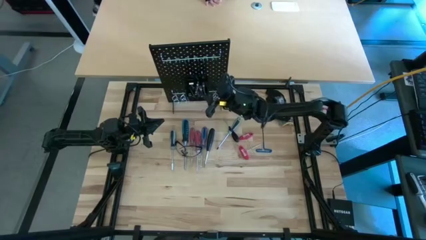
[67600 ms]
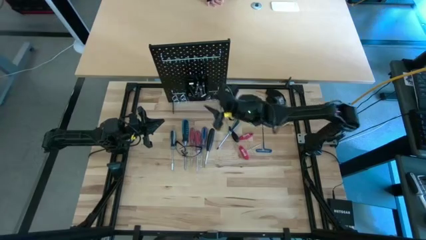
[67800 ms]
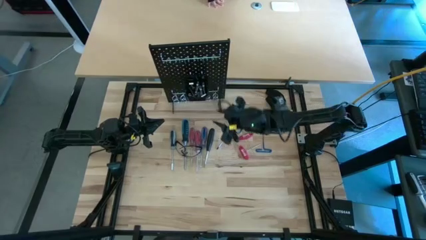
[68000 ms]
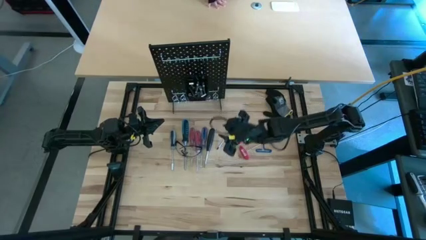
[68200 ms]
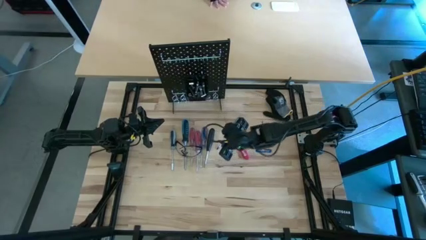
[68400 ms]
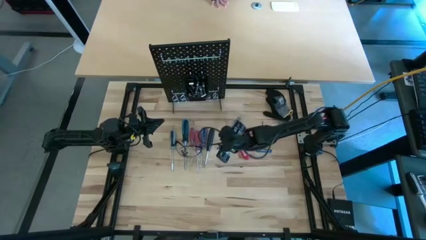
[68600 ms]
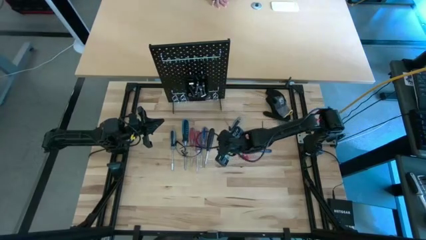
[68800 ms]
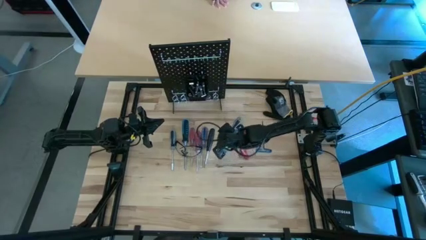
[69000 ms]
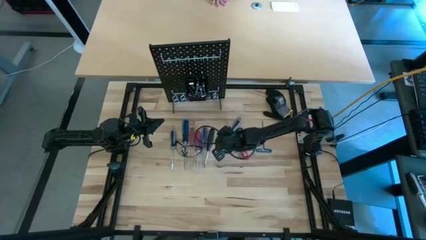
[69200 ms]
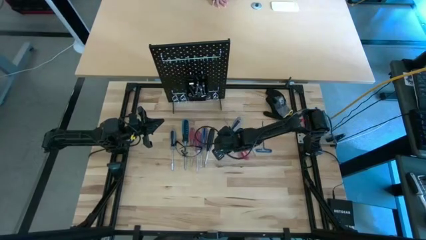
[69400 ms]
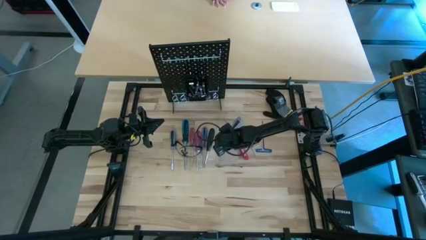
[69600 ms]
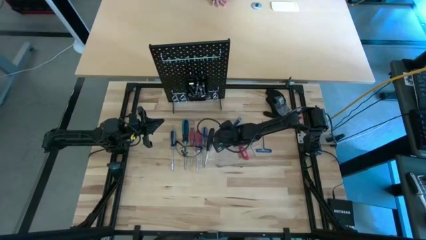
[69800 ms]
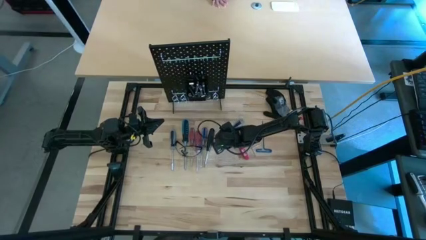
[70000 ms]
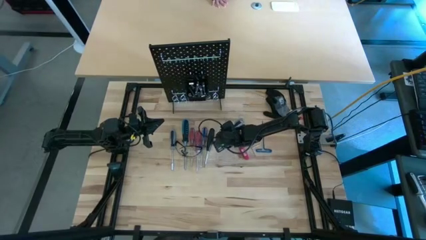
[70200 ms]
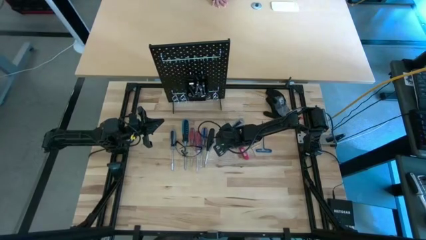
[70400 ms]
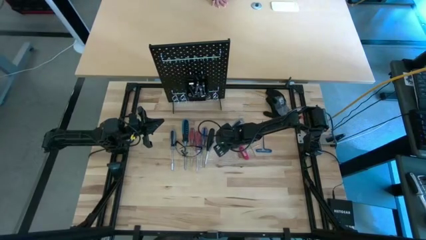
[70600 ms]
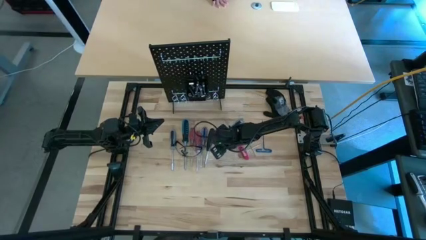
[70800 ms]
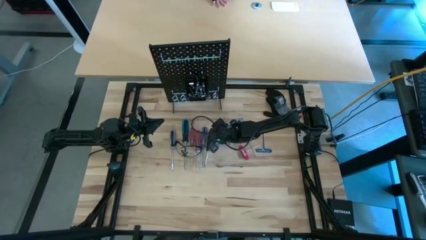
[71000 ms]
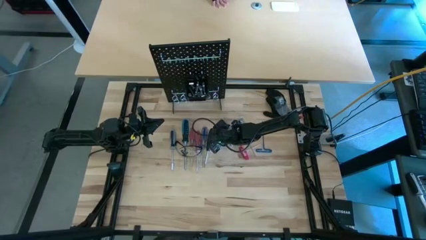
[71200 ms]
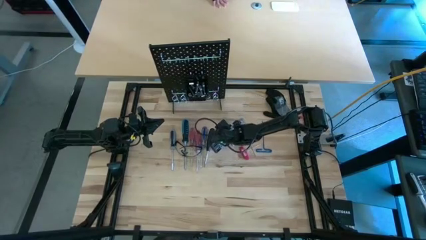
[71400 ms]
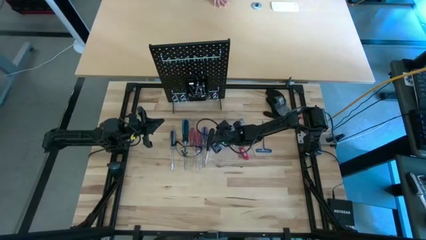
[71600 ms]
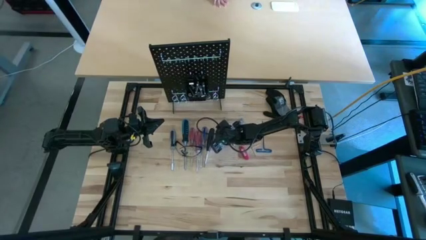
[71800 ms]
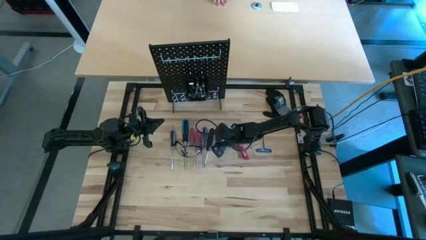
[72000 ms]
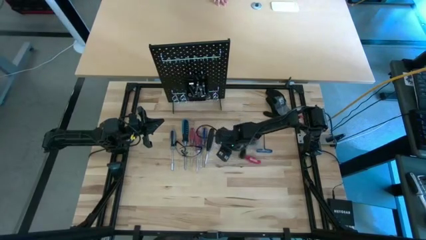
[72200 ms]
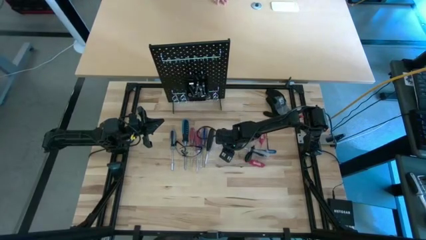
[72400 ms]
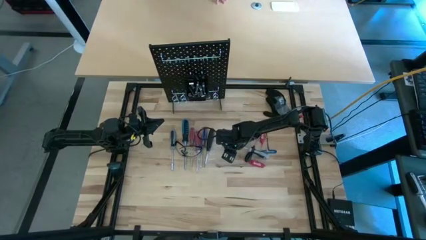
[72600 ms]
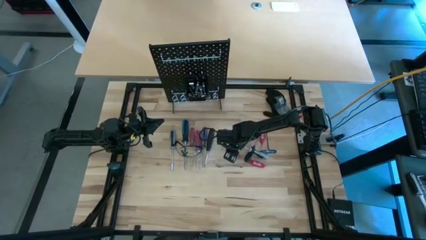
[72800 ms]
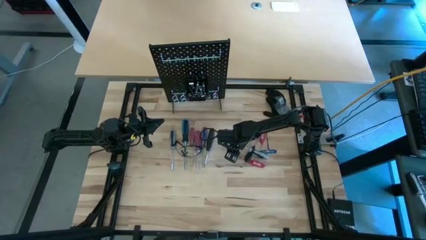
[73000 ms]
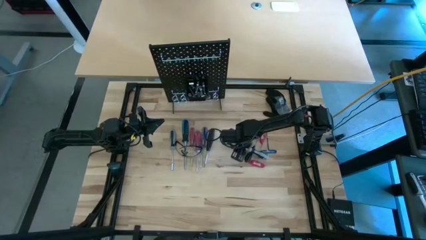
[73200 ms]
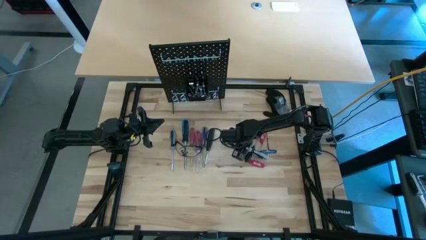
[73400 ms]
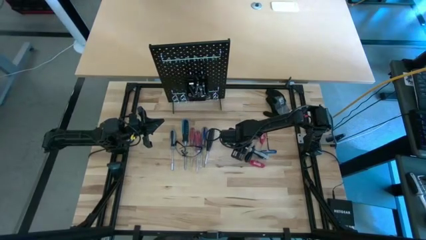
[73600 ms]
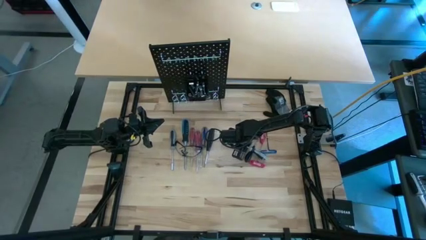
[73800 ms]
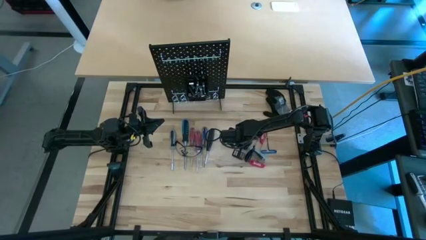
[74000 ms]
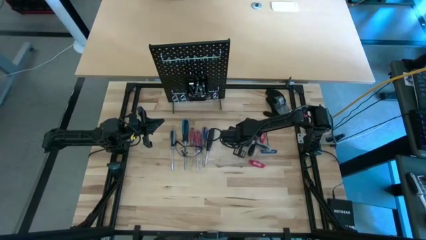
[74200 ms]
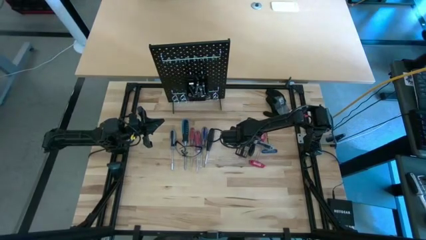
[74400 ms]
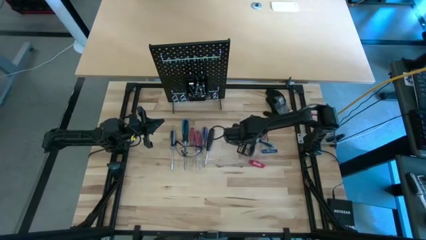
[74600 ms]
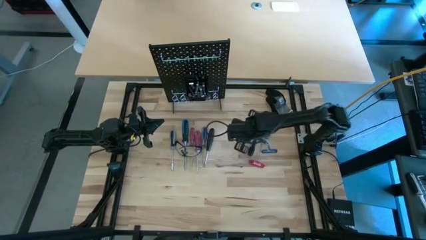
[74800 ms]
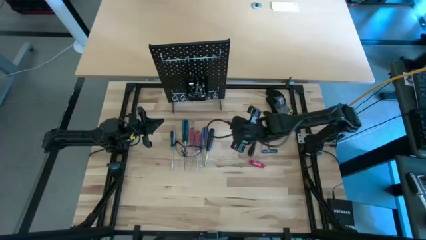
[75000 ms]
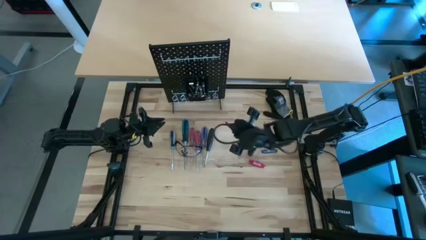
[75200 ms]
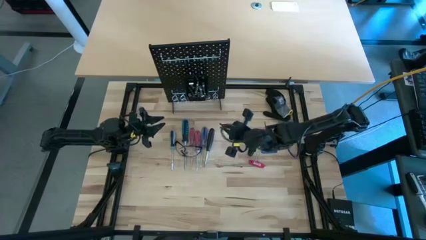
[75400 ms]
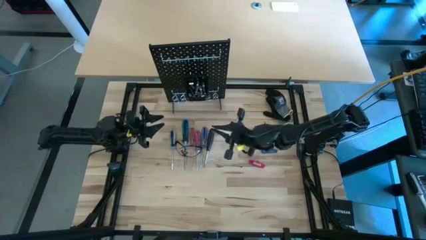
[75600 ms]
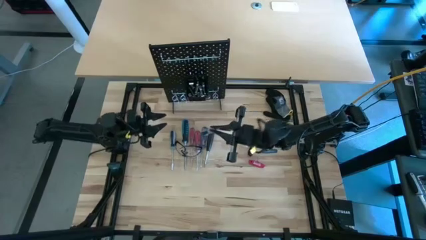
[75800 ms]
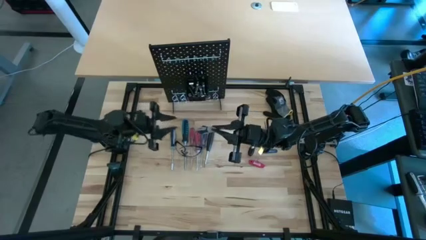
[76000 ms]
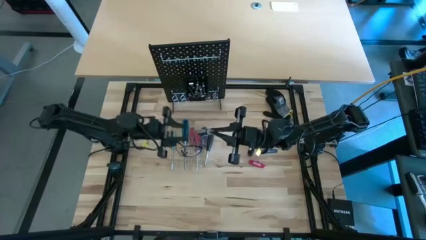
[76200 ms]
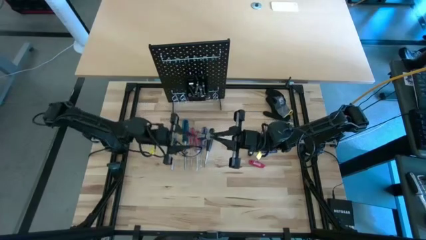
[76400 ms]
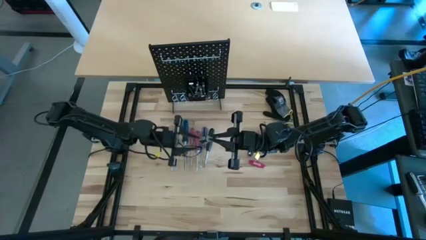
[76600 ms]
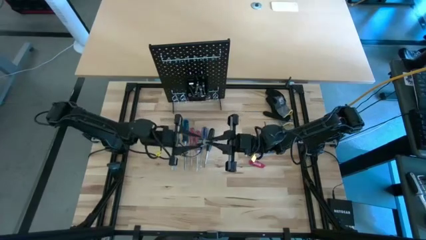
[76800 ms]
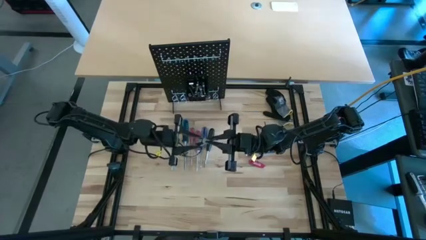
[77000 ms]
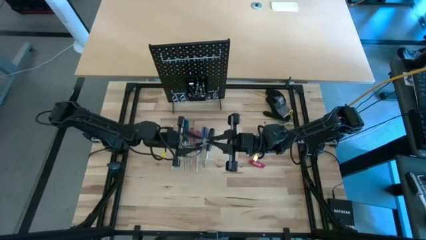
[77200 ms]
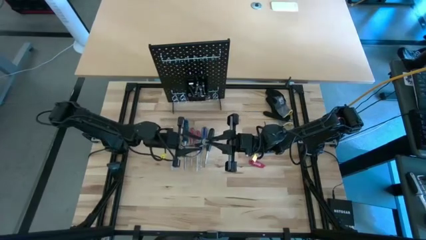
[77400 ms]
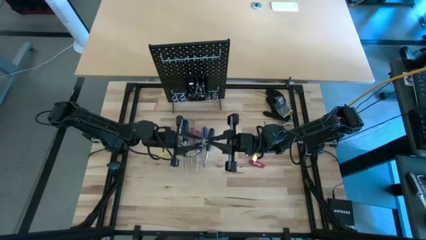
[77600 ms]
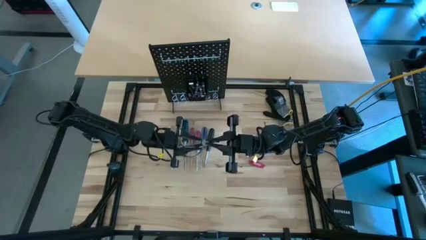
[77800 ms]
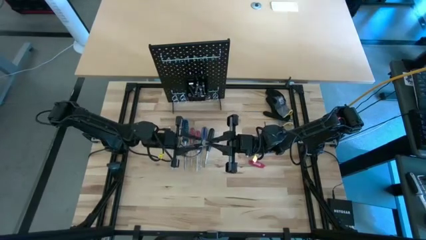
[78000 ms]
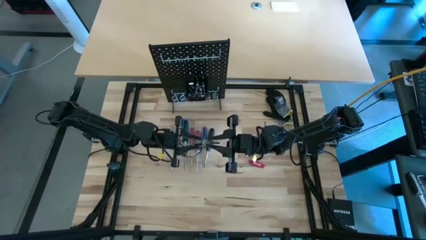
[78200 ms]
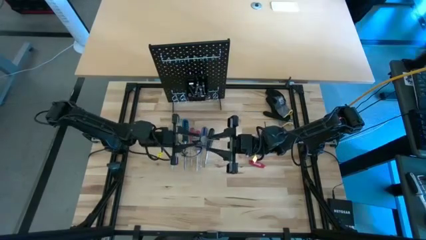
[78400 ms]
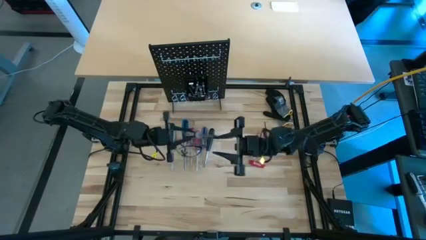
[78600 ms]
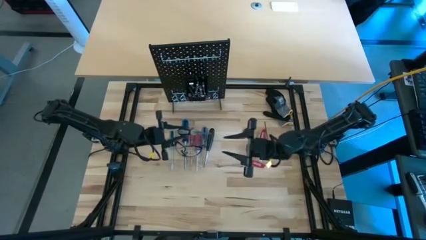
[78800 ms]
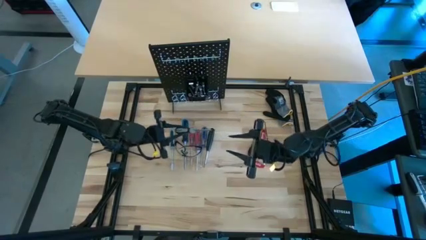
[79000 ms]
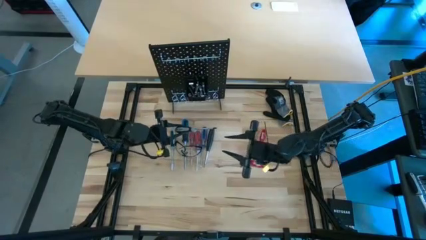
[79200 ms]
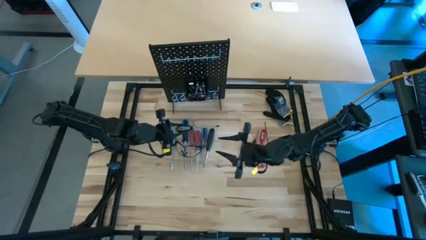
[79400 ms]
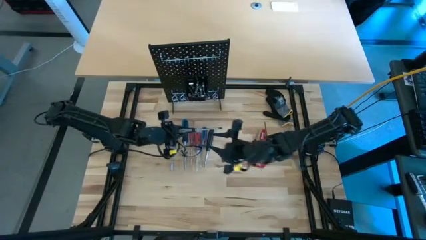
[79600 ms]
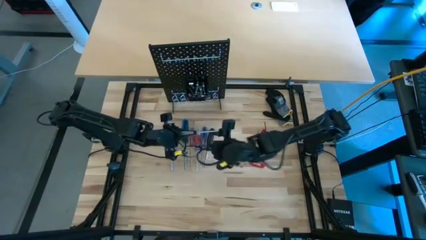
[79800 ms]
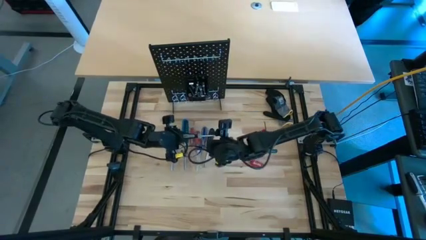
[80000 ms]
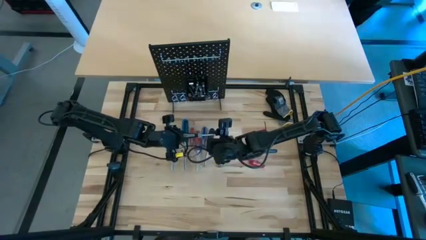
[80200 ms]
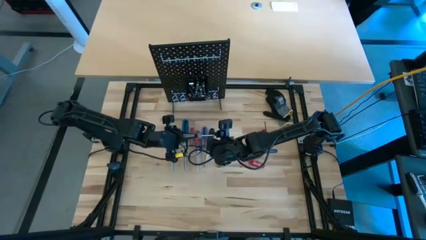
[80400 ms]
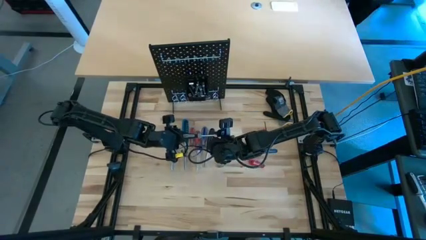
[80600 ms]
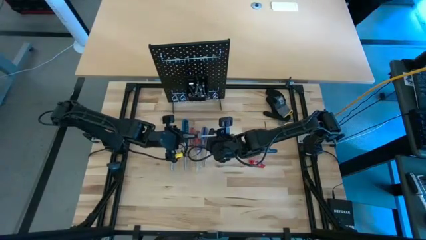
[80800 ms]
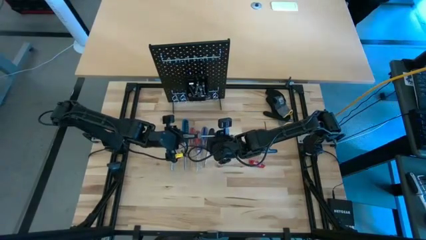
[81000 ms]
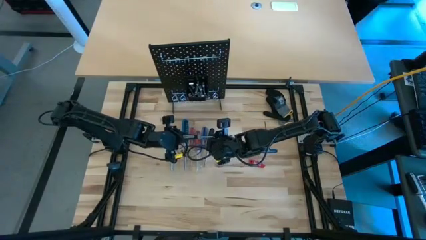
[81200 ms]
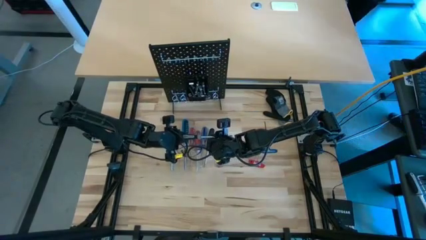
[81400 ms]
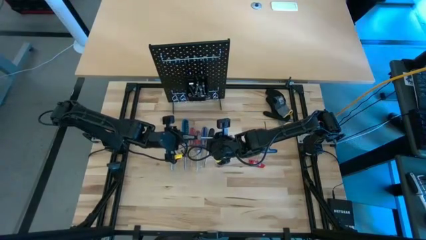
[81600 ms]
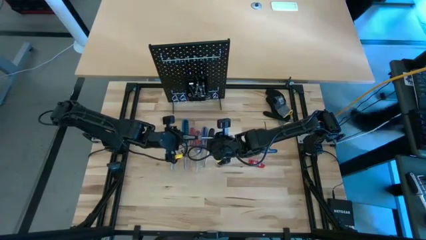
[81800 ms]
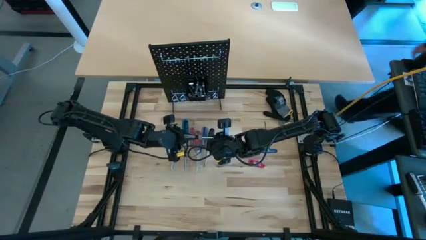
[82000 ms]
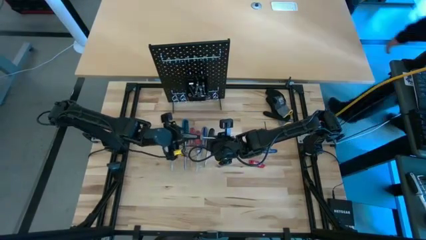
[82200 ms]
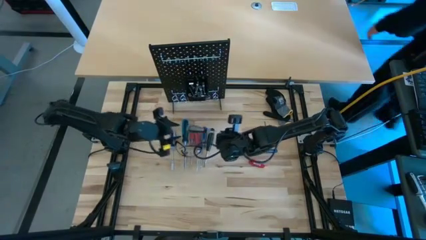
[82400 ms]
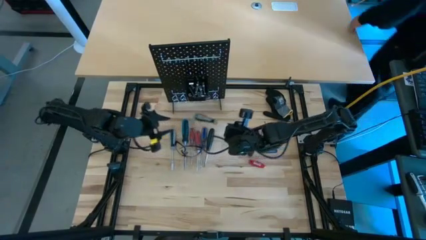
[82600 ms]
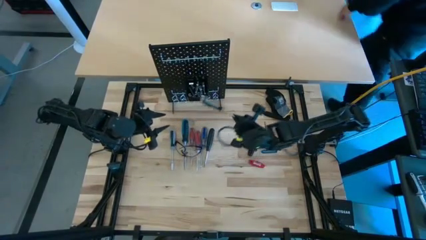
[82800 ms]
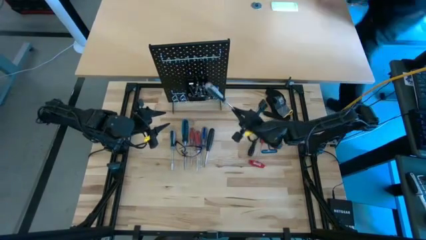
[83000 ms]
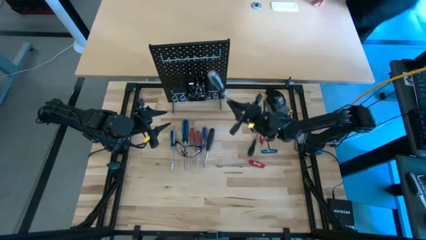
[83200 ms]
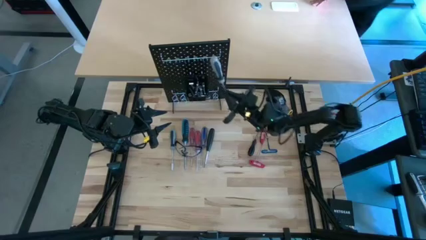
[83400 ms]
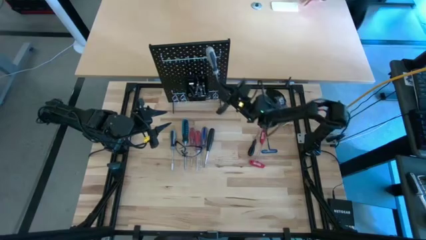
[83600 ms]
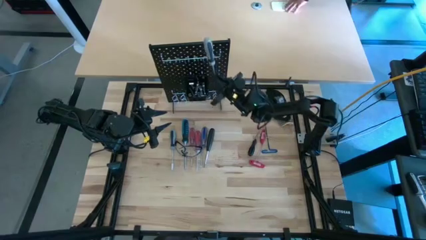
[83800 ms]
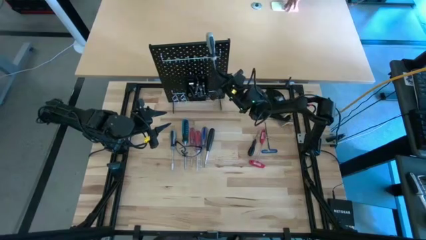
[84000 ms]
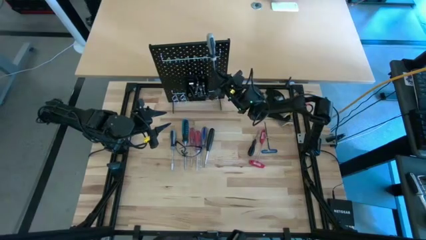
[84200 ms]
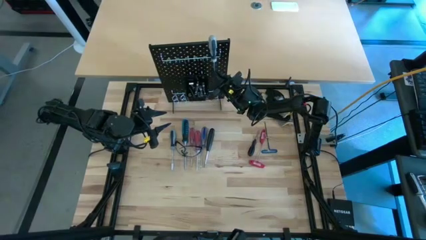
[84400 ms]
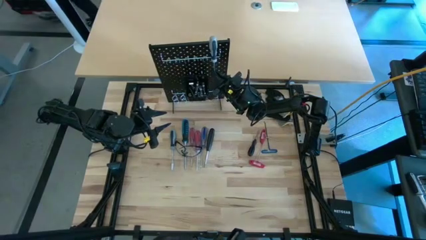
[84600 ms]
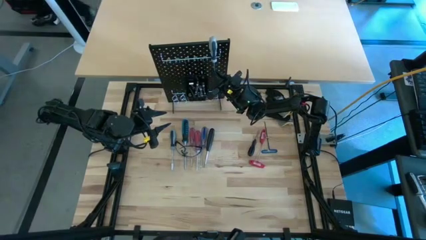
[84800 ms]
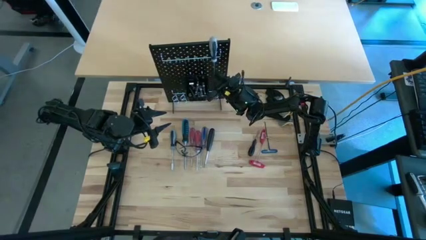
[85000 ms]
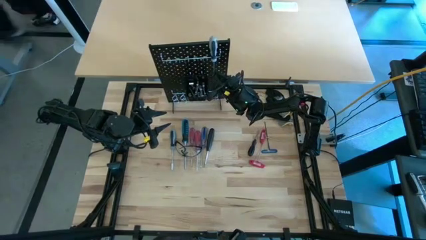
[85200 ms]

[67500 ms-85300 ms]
Task: Hang tools onto peg board
Hang the black and grey screwdriver on the peg board
